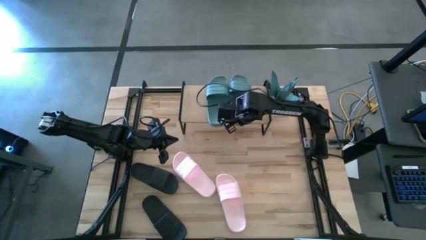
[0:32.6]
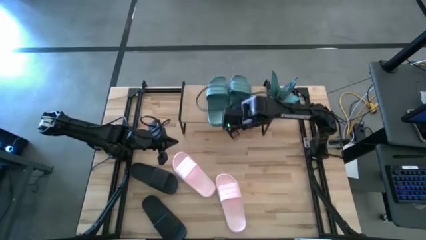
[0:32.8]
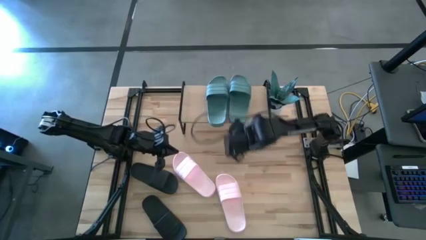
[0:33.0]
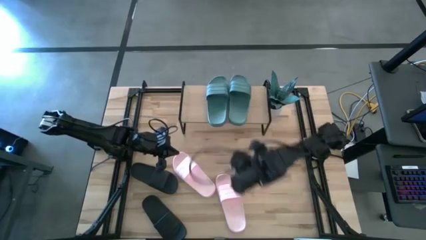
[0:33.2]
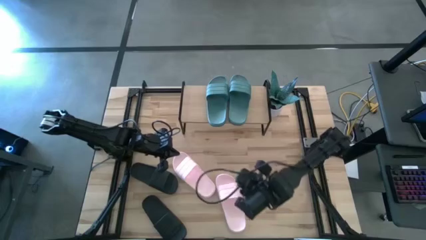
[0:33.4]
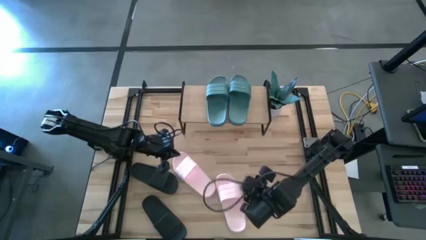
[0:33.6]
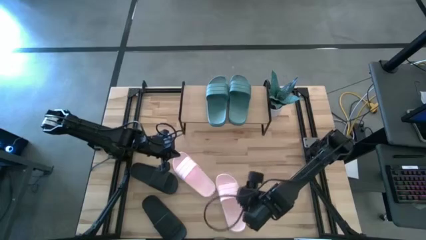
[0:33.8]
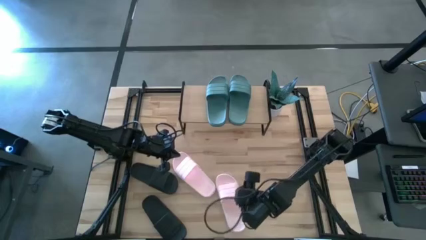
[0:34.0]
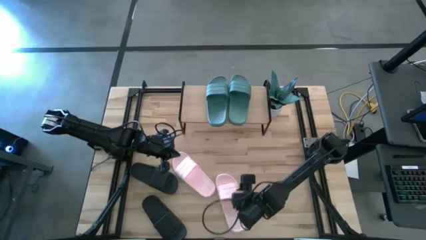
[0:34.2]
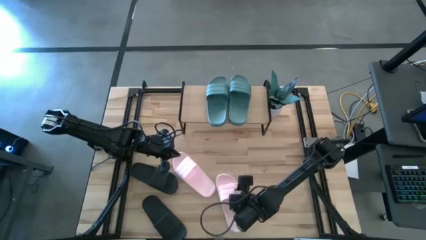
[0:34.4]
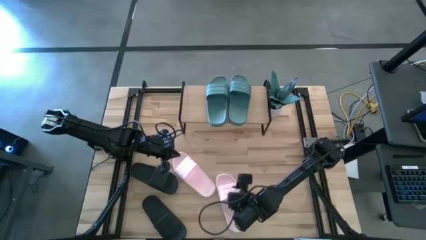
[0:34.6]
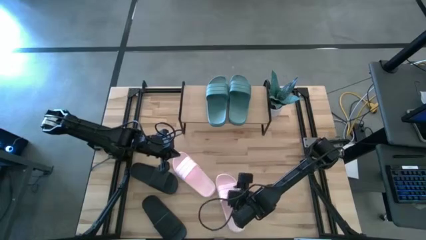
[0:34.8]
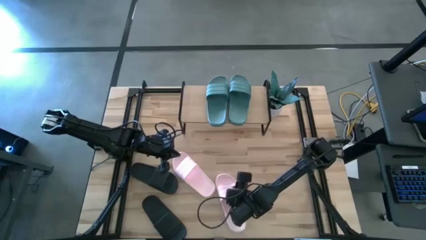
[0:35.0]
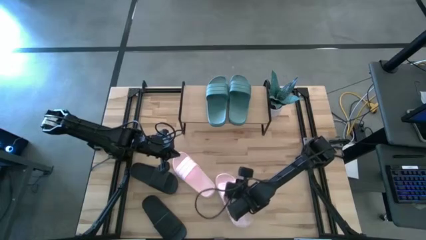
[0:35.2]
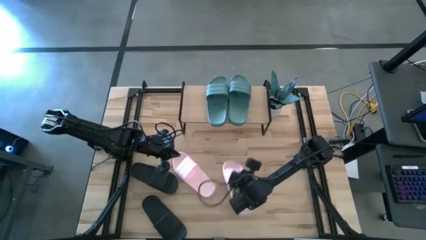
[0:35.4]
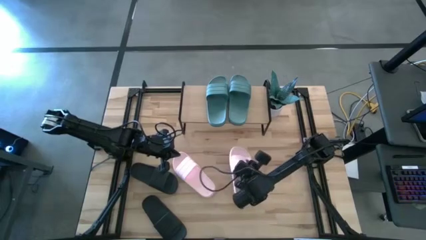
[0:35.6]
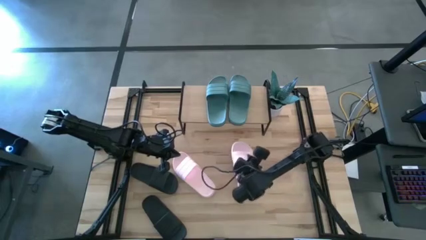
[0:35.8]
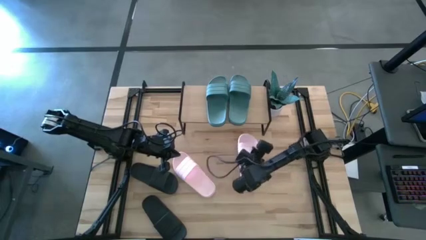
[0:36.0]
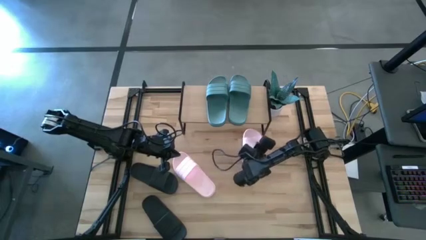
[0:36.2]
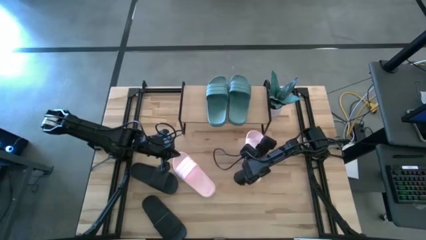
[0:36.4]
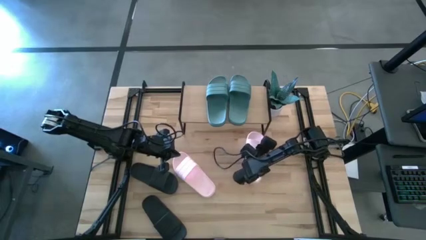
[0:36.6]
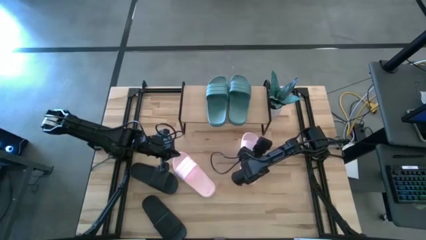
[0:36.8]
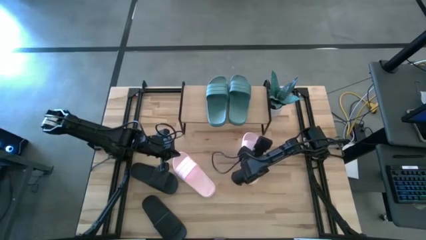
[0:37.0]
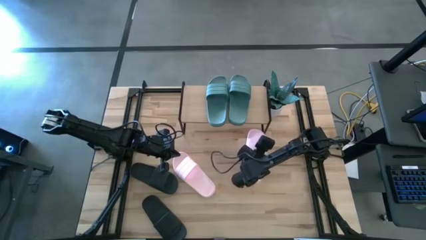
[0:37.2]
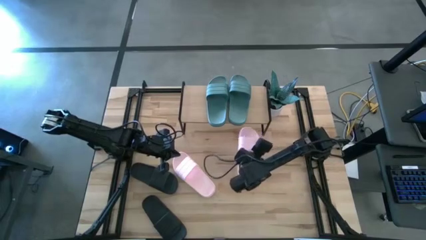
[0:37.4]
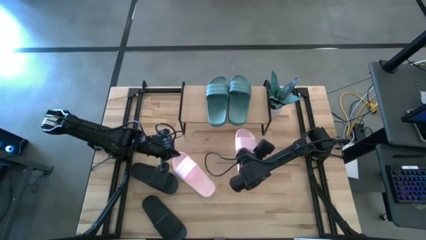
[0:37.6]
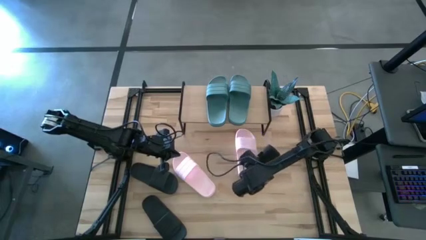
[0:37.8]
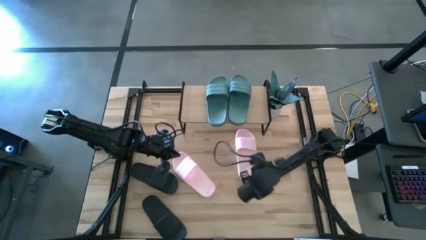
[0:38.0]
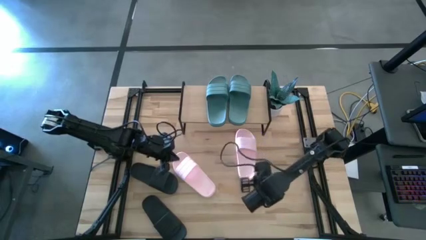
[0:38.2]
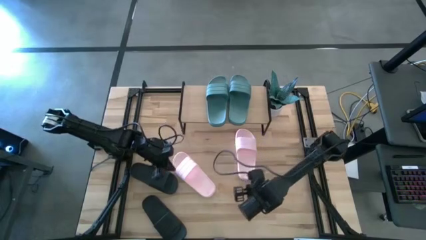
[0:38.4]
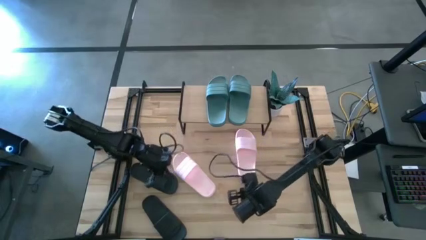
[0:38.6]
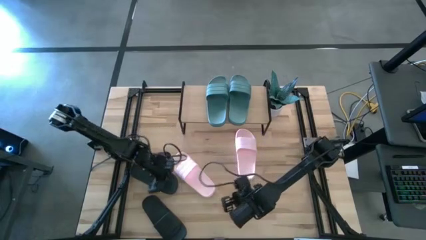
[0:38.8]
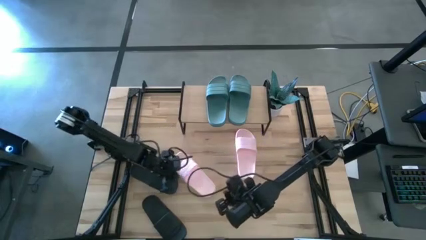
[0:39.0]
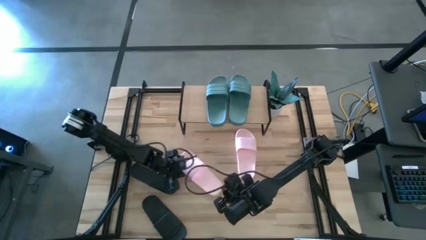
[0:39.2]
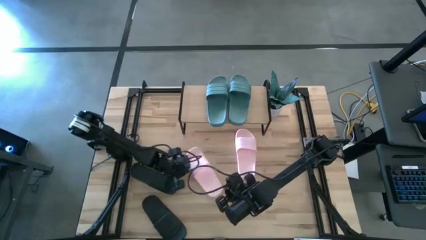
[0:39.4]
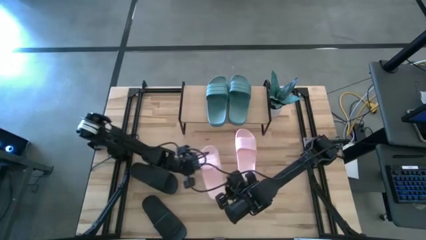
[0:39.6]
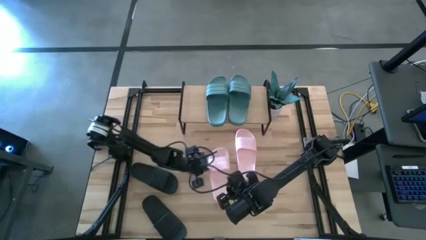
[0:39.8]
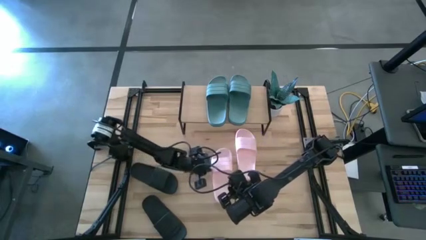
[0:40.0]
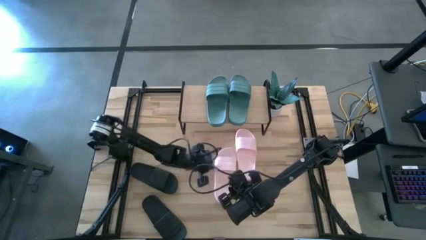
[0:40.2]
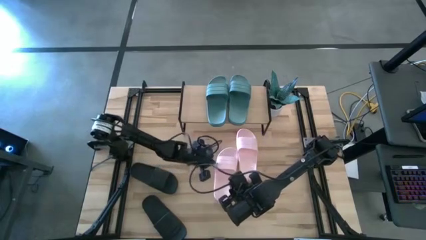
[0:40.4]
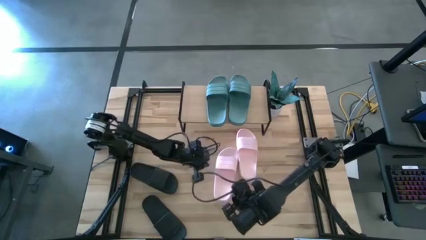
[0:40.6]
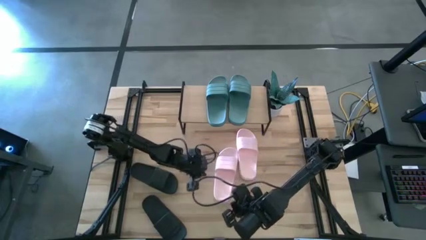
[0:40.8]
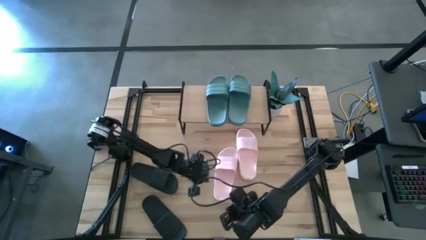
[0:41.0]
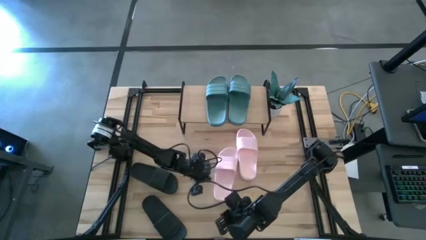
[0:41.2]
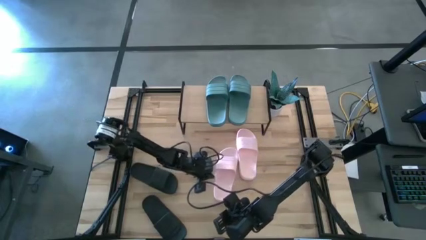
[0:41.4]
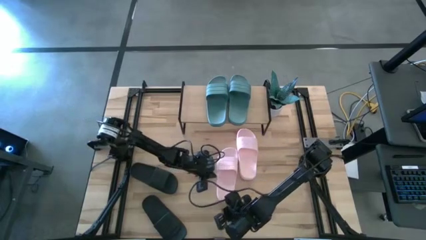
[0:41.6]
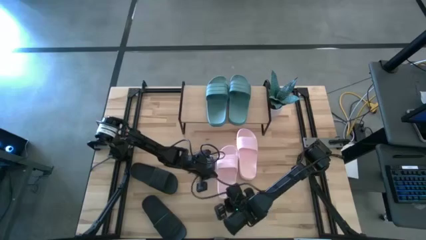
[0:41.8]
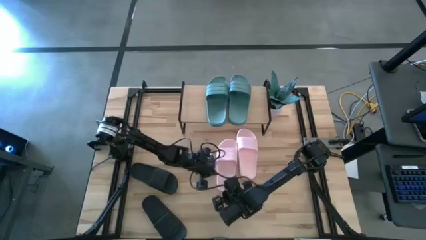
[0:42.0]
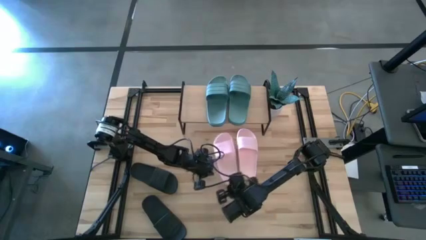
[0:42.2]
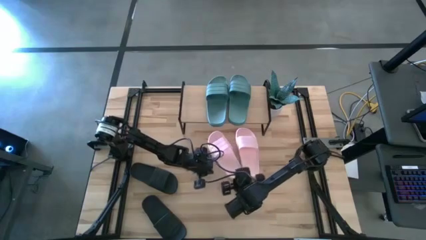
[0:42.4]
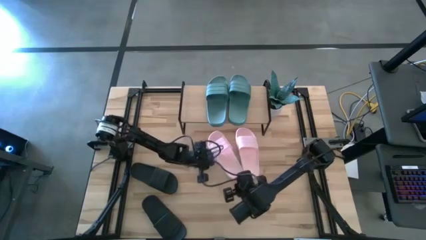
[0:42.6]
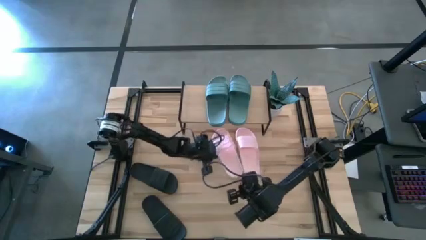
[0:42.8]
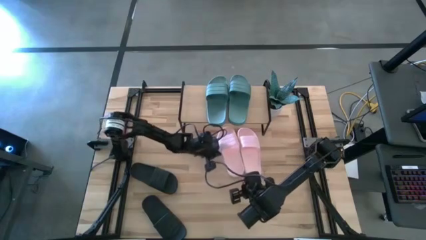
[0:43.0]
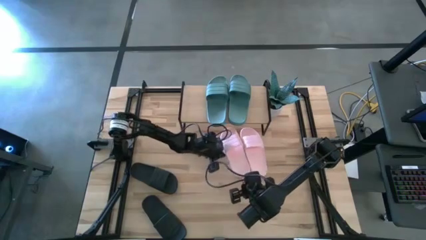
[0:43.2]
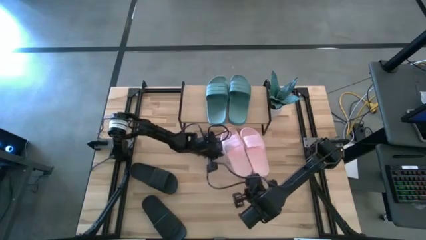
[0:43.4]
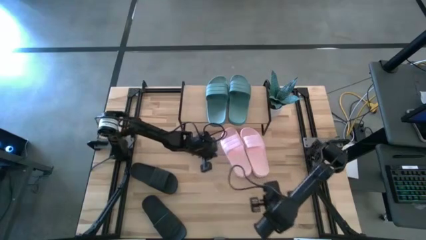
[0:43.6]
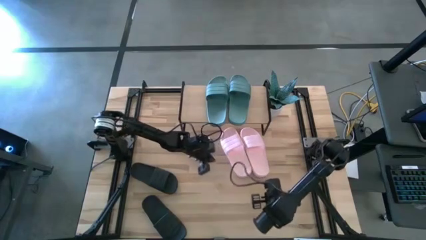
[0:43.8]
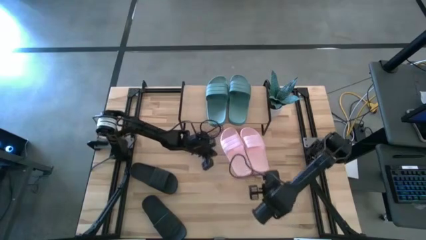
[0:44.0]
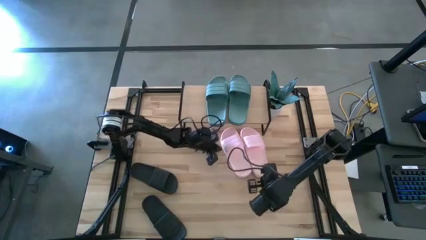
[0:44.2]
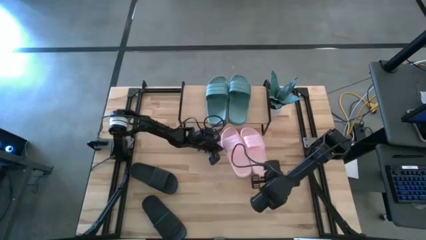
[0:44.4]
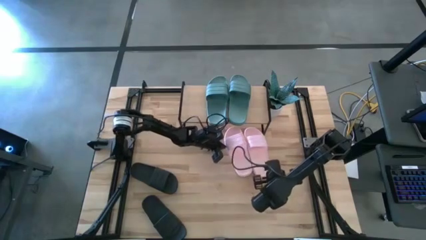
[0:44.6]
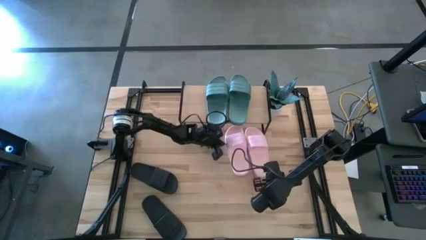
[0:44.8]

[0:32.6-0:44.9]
Task: Pick and place slides into the shelf
Prepare the pink pair of slides

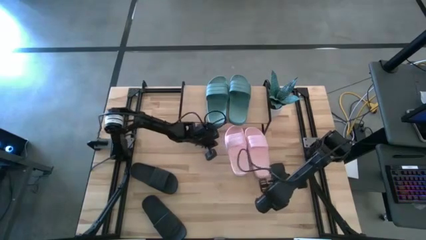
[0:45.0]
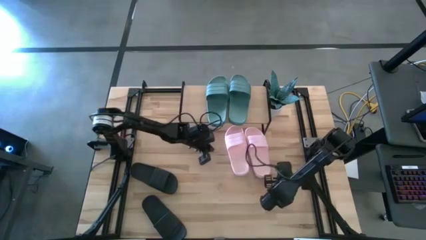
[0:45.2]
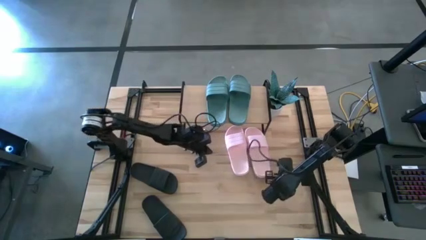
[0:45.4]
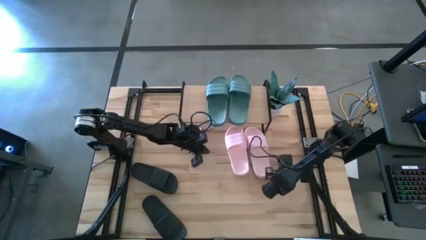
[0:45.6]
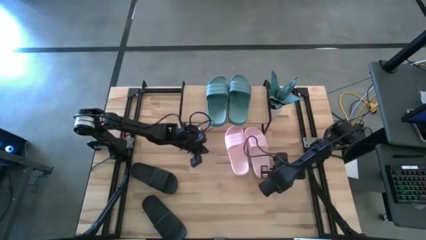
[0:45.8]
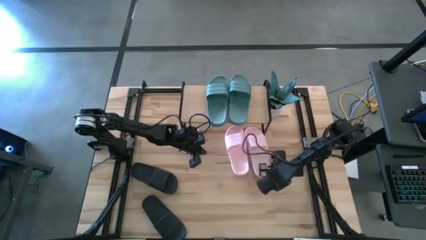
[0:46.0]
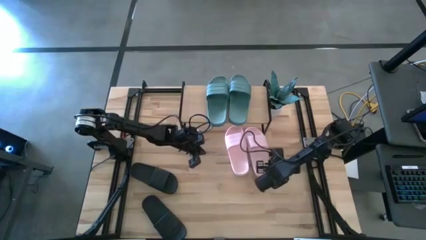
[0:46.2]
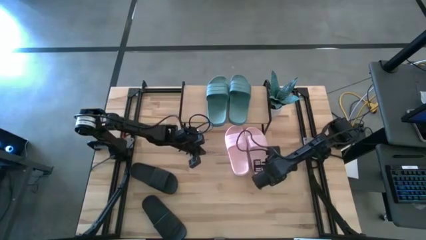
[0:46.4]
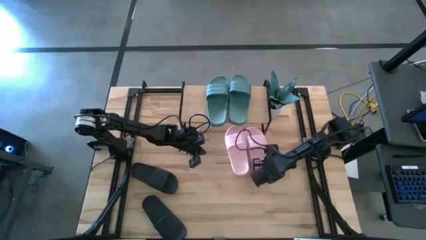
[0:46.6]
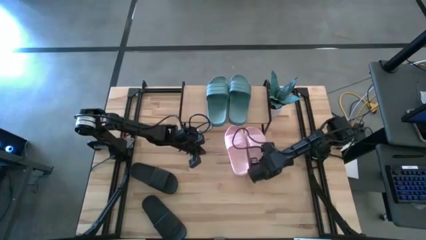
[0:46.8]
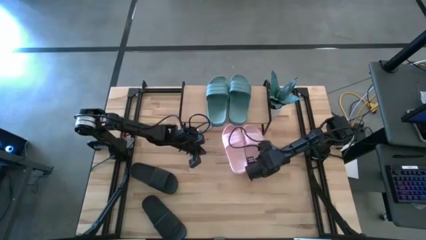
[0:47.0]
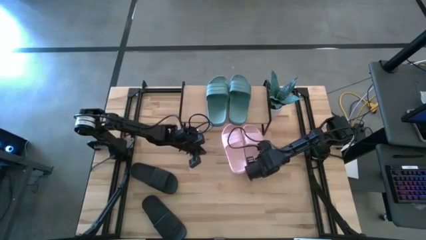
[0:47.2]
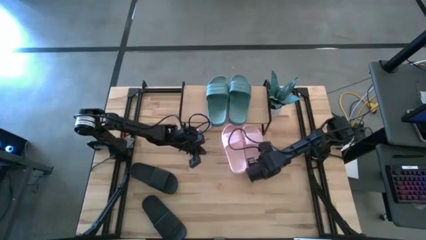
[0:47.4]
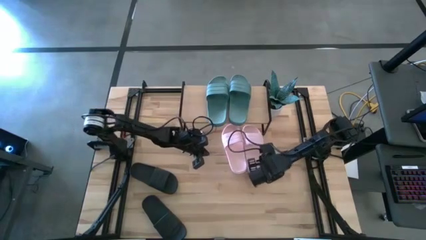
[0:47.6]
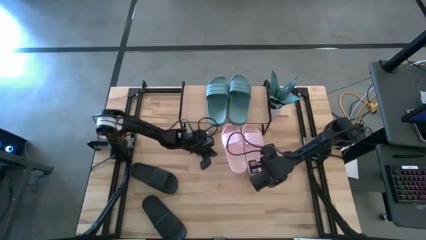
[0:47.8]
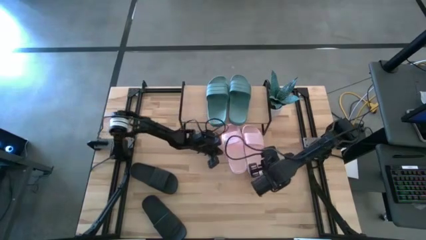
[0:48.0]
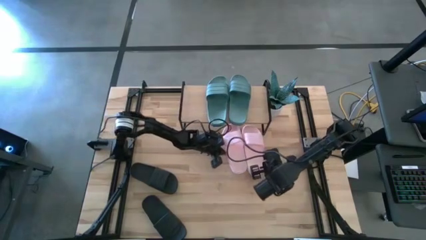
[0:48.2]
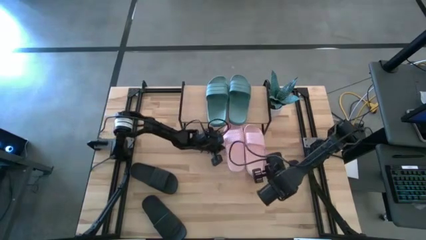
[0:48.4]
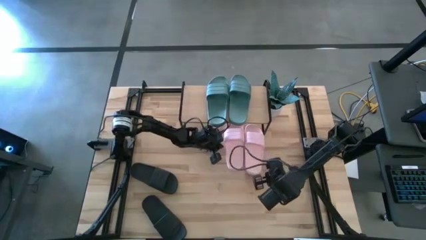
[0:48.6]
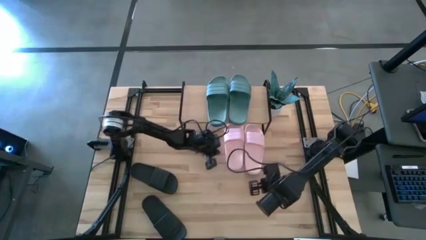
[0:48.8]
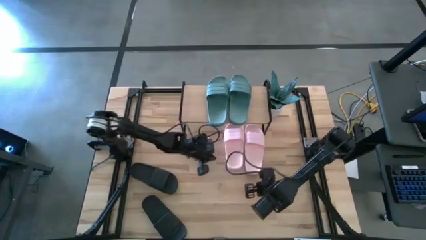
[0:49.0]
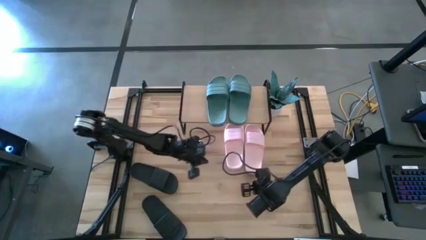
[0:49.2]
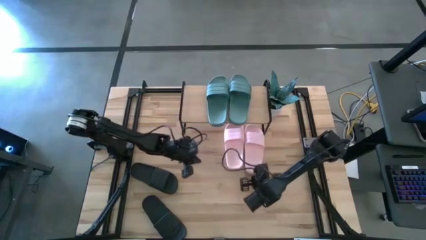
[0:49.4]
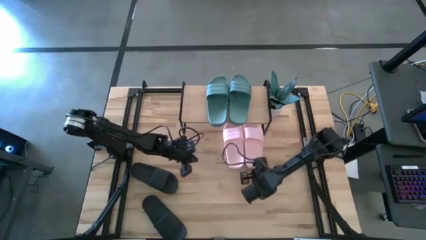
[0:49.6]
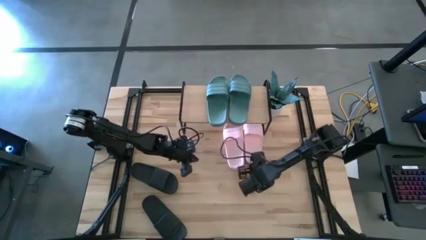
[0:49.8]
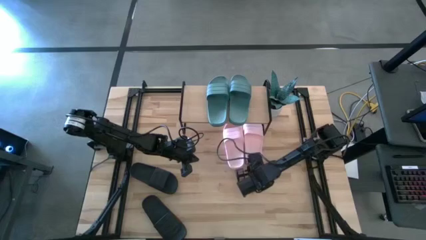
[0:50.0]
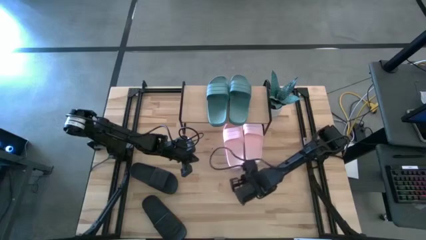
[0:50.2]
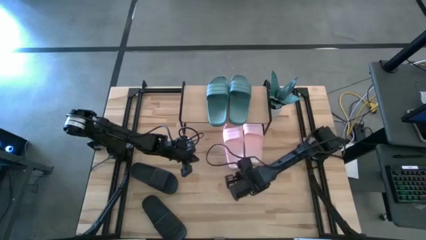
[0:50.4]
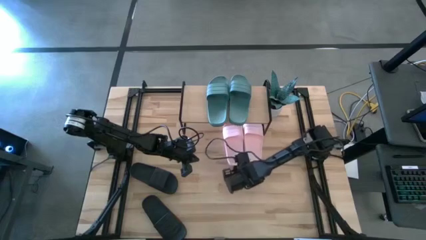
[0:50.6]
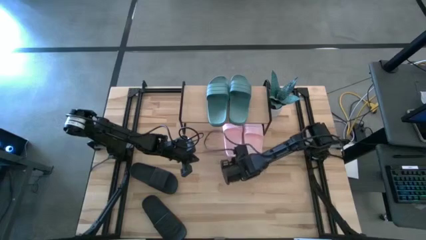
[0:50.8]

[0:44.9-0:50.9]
Put the pink pair of slides under the shelf
